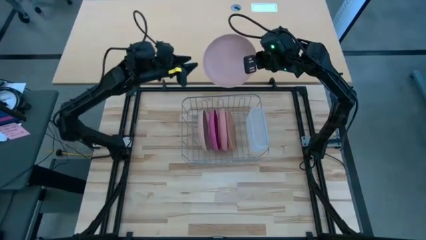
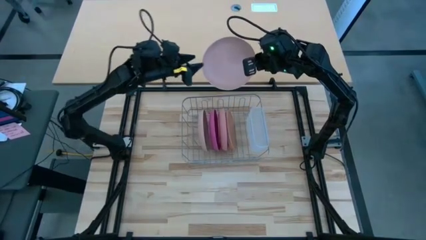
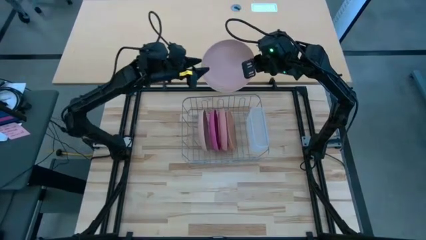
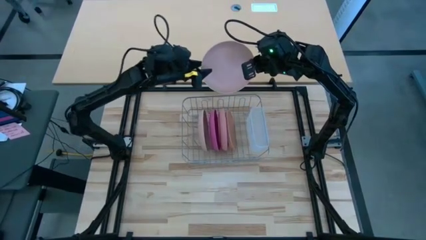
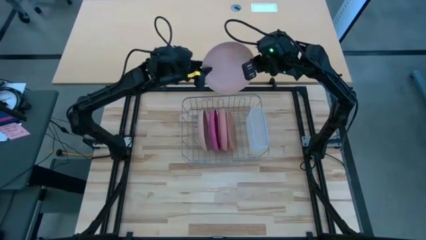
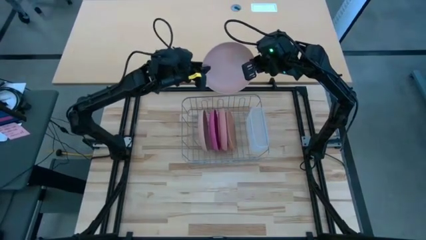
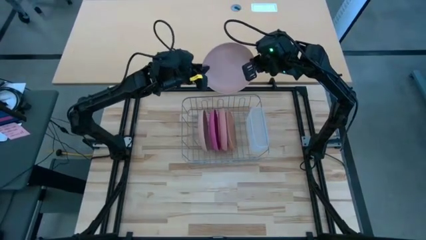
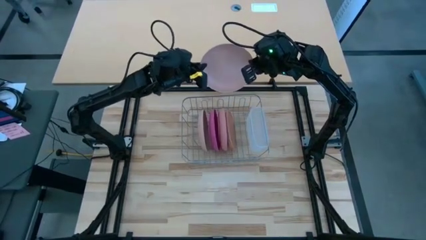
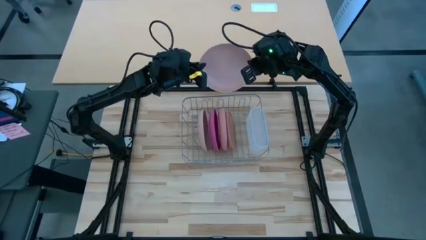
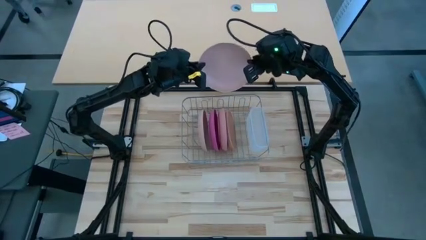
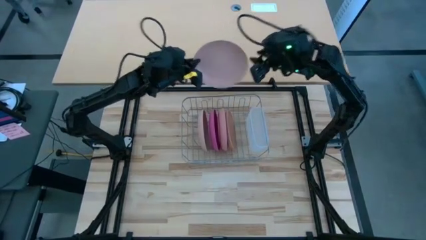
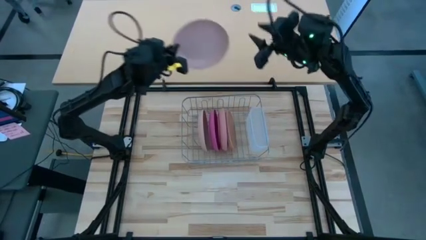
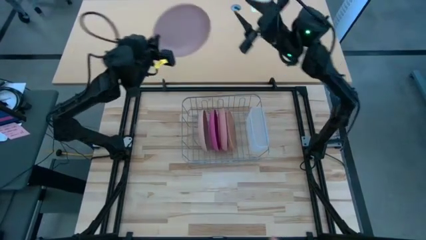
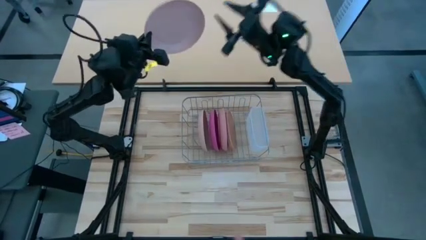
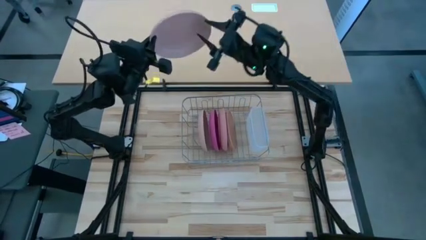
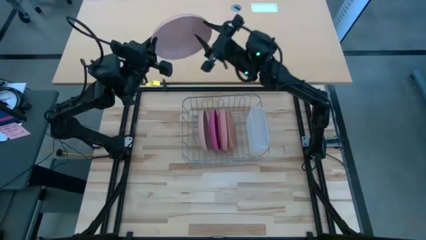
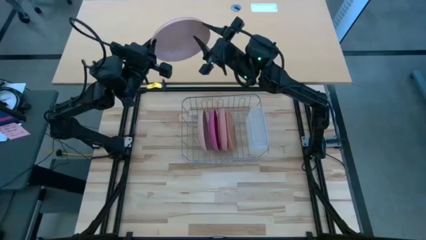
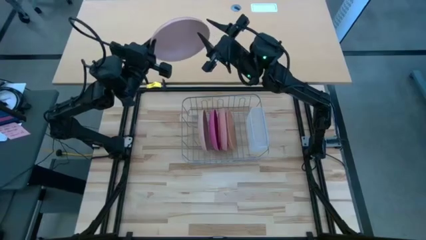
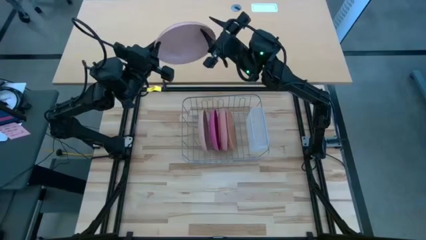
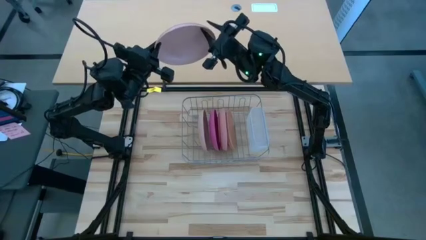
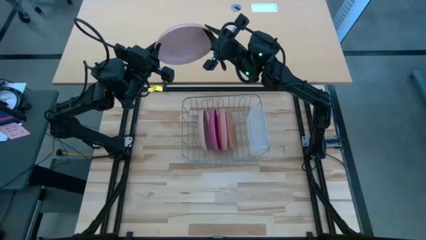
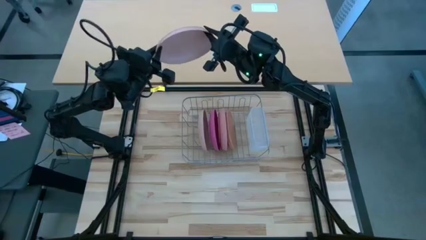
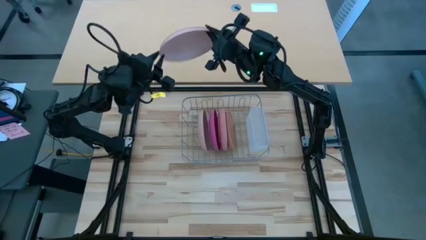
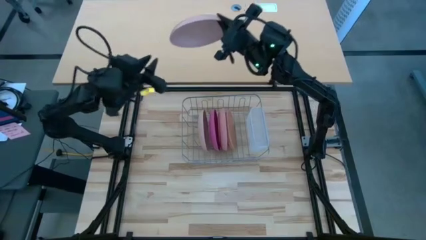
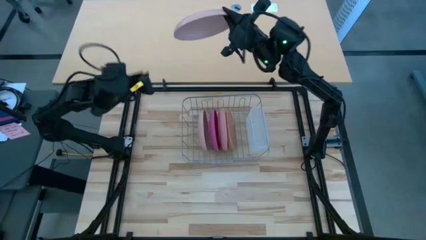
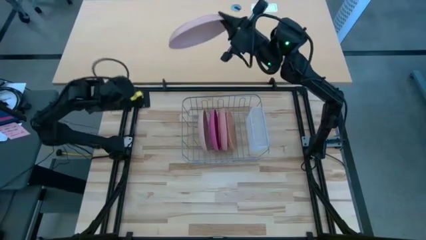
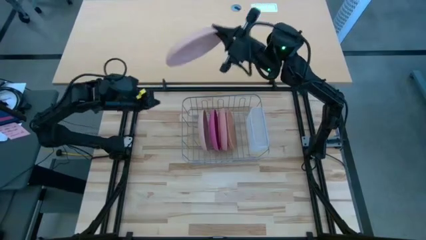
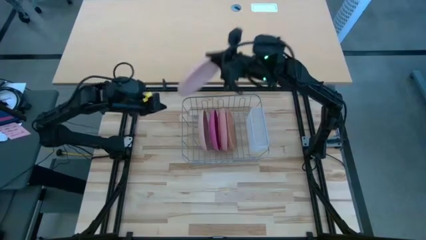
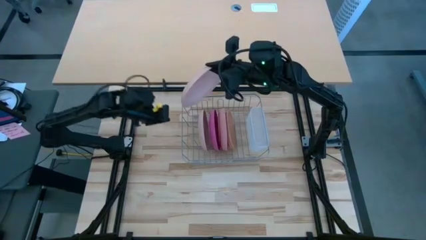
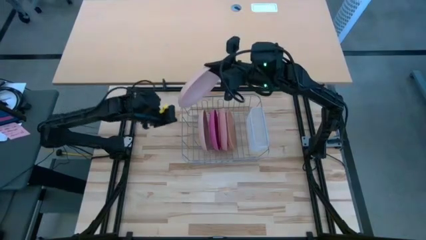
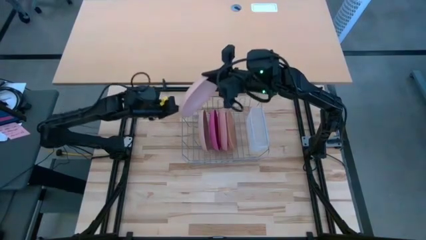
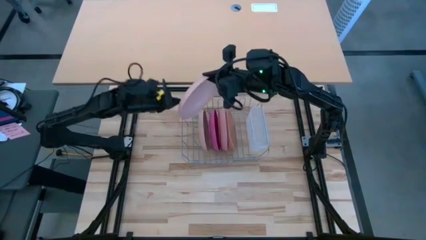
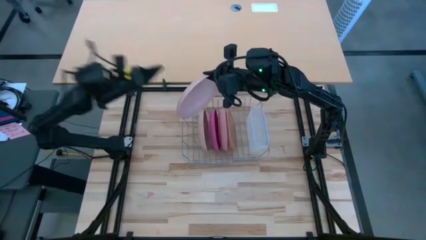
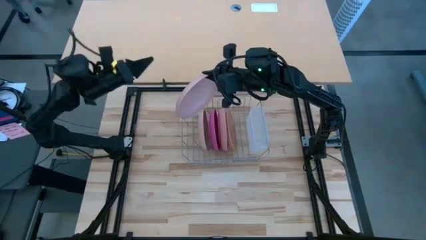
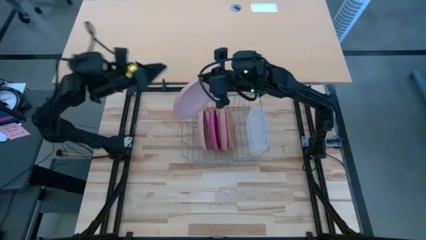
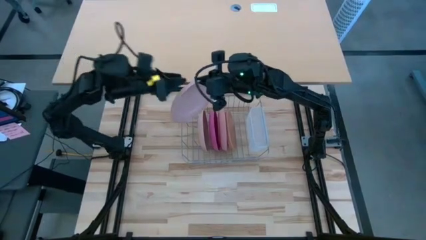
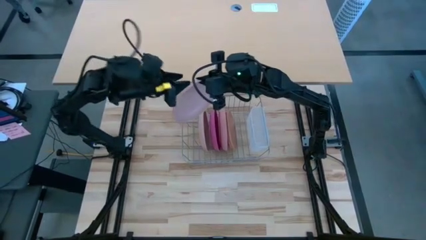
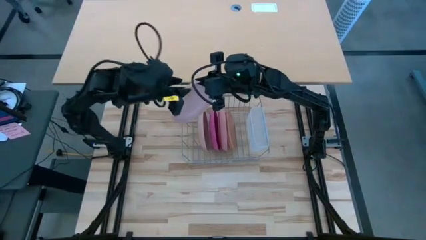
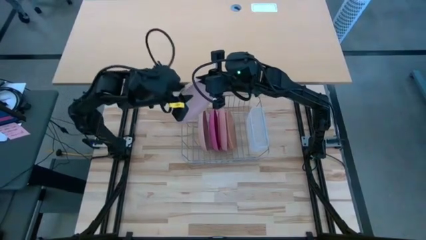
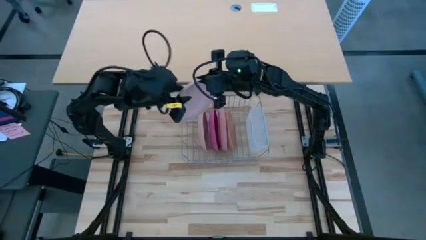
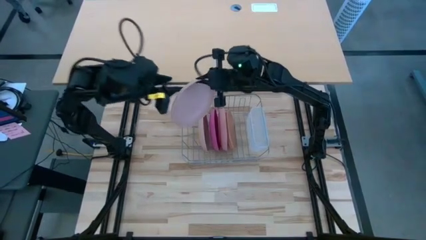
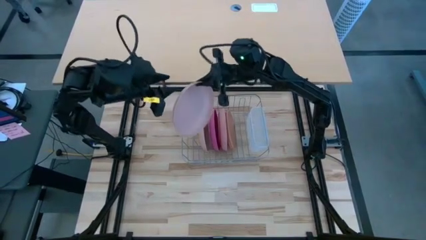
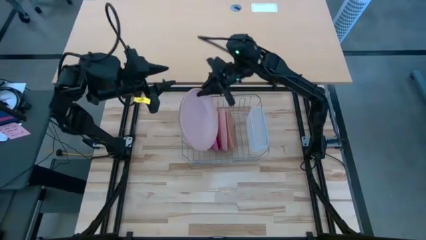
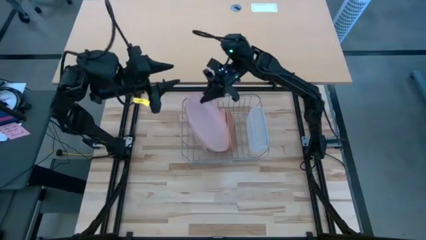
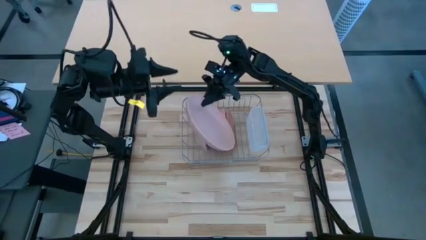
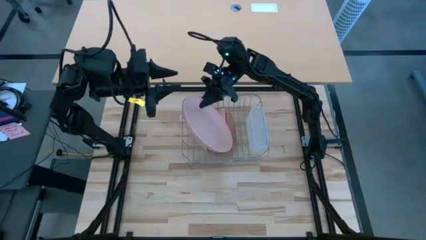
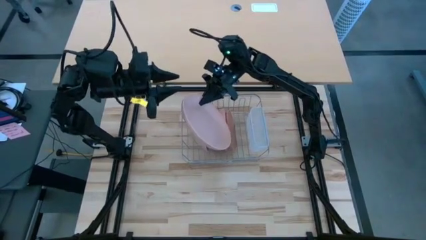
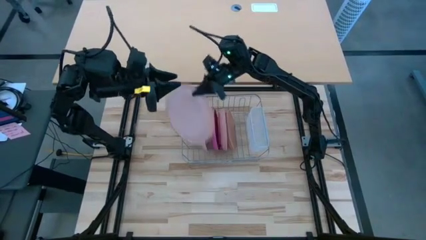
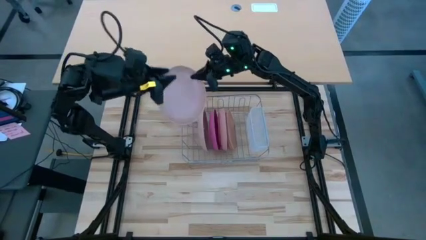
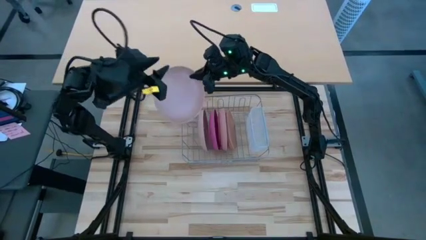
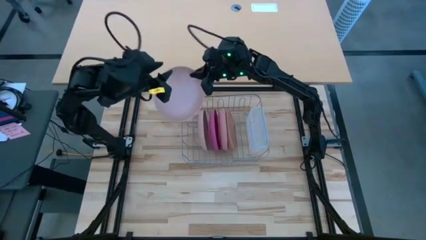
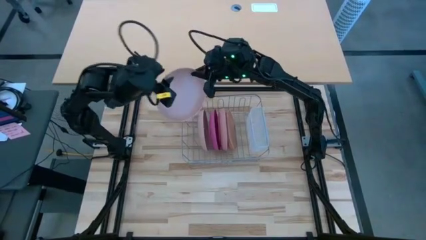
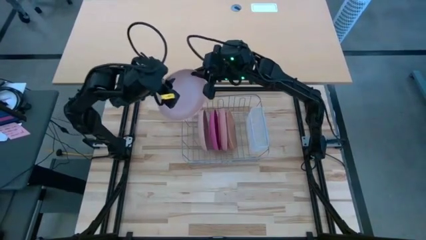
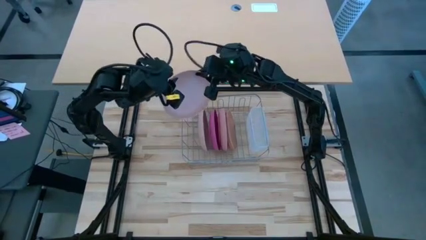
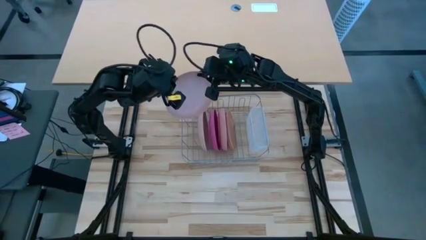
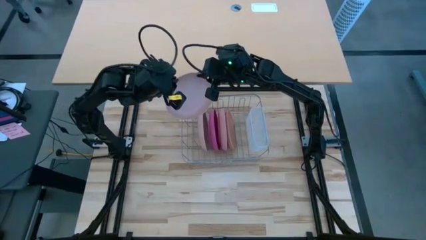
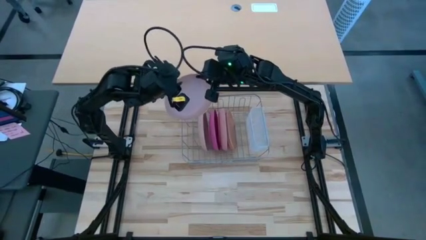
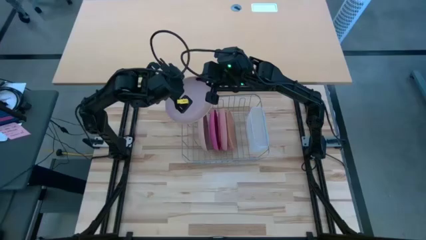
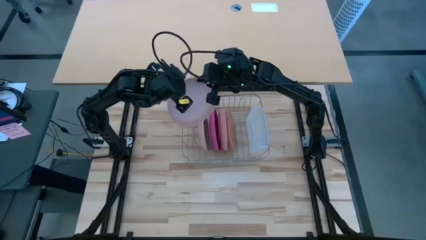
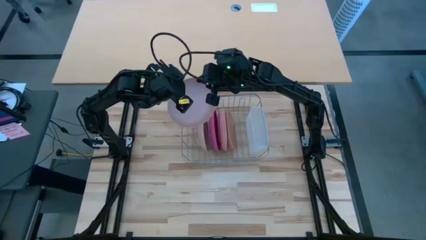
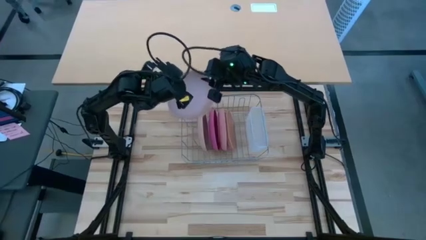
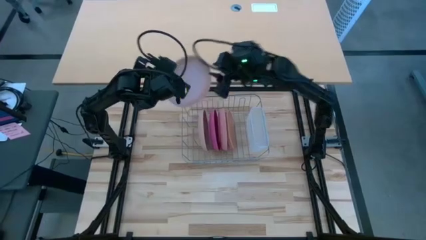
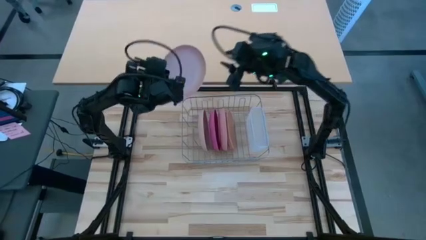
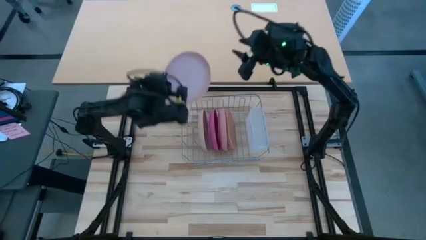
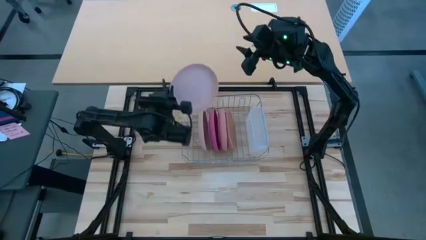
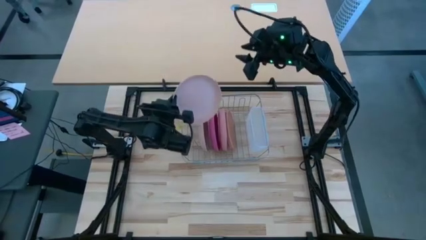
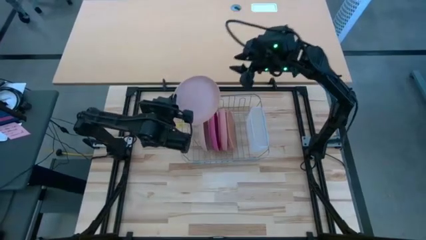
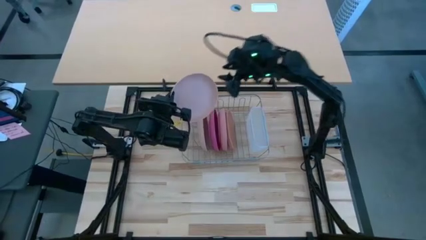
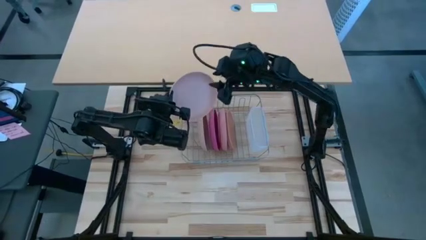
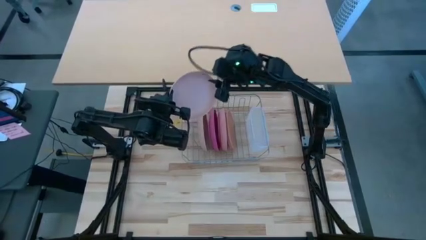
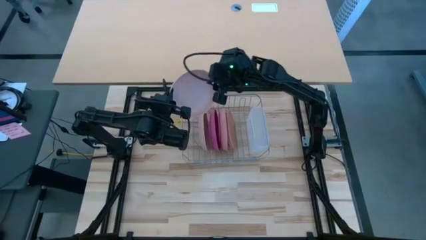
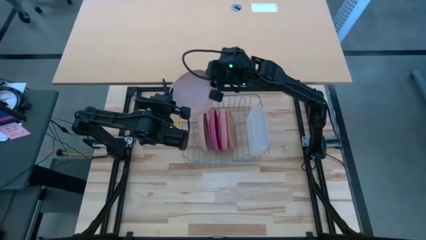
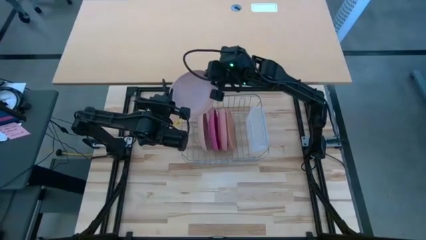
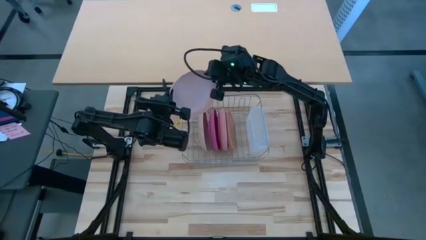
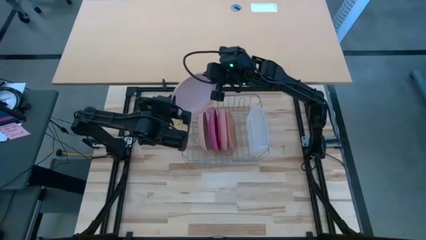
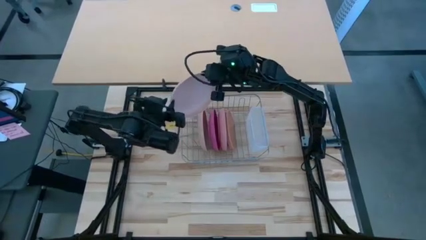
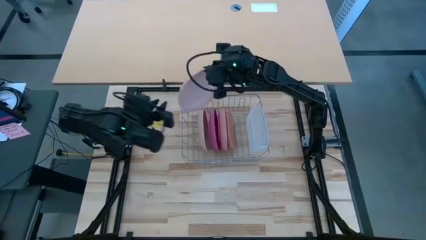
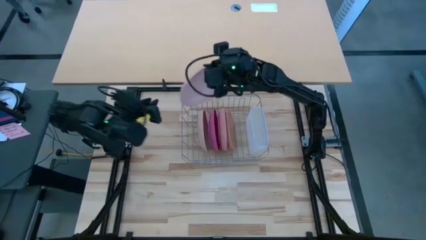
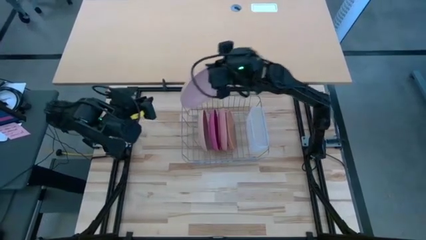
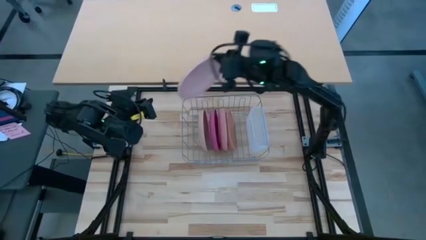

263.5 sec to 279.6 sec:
Task: Sort dishes
Put the beige plate in the dish rack
